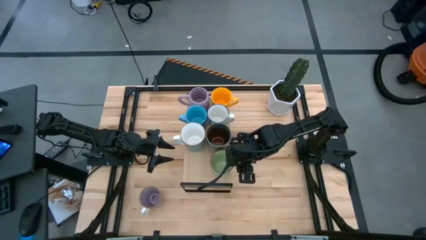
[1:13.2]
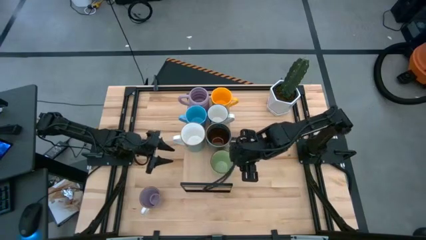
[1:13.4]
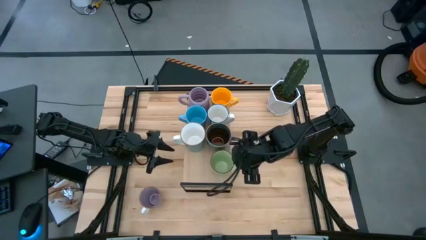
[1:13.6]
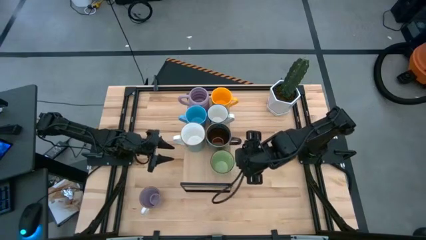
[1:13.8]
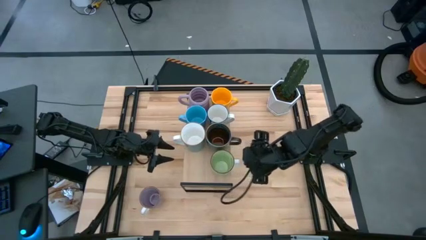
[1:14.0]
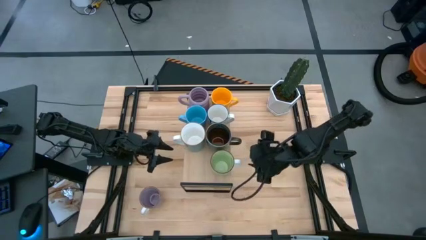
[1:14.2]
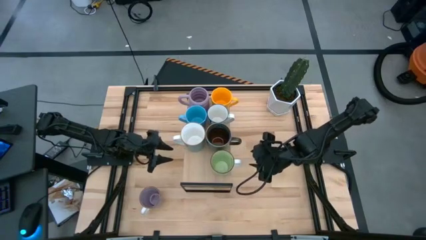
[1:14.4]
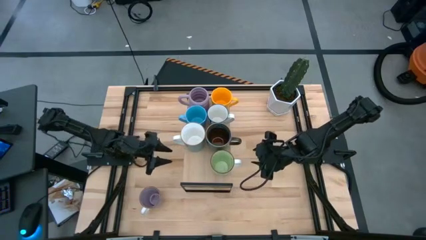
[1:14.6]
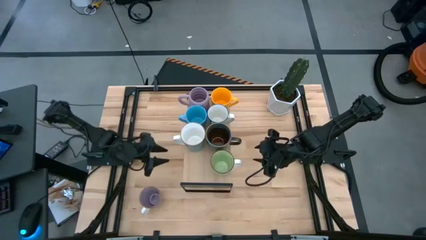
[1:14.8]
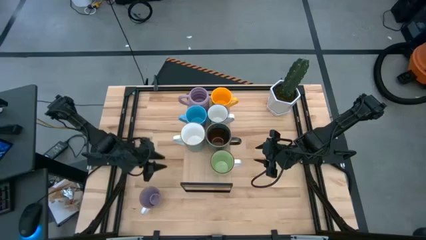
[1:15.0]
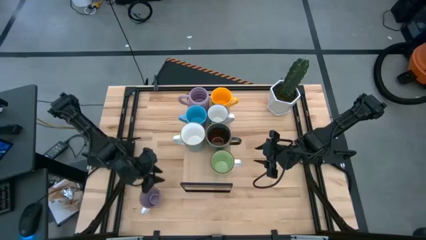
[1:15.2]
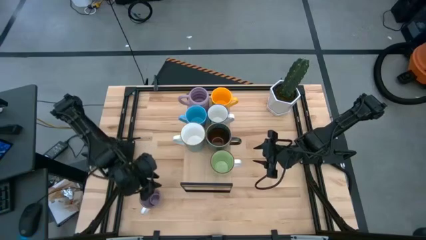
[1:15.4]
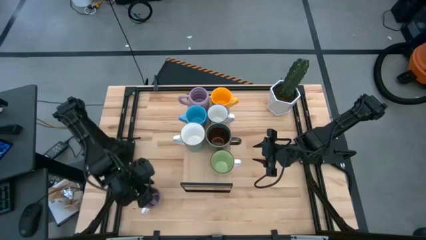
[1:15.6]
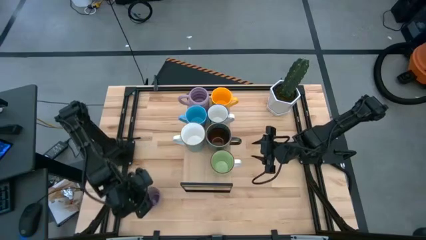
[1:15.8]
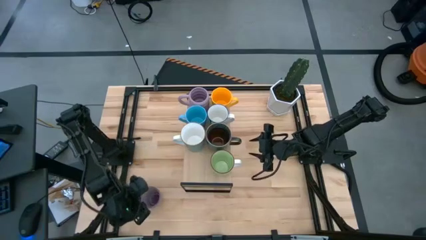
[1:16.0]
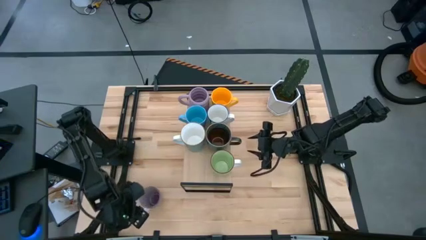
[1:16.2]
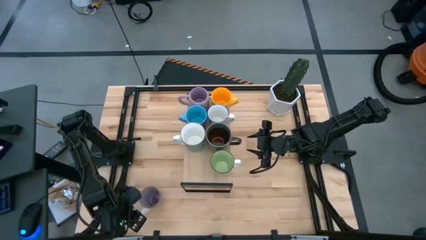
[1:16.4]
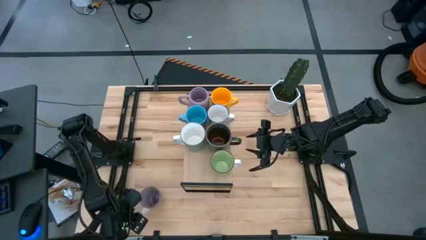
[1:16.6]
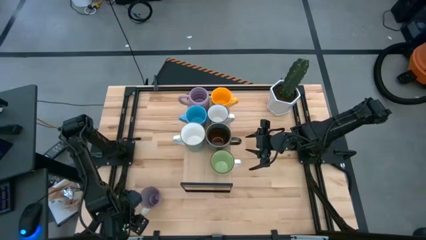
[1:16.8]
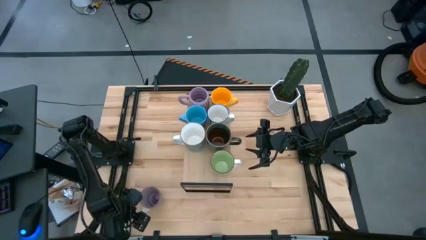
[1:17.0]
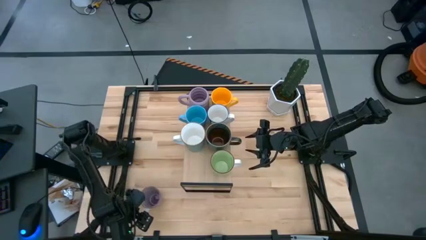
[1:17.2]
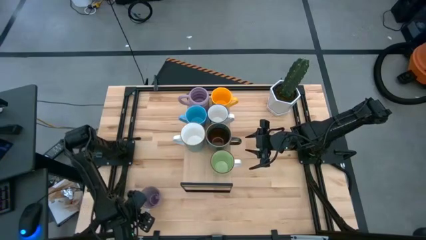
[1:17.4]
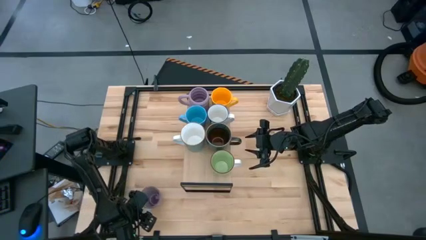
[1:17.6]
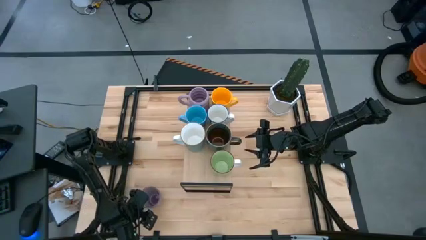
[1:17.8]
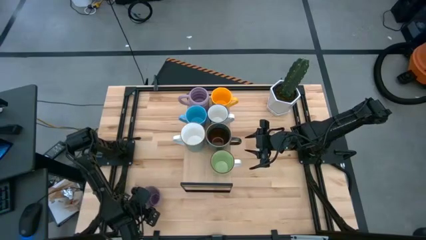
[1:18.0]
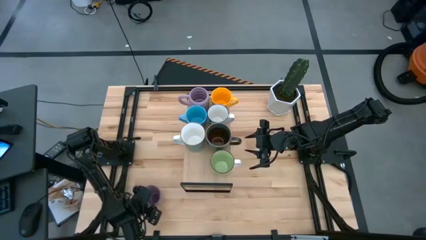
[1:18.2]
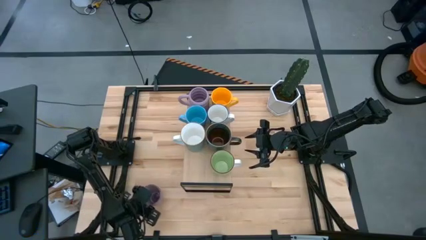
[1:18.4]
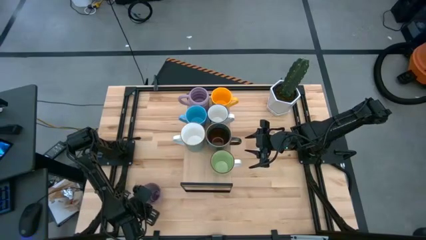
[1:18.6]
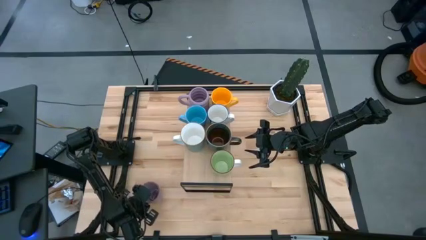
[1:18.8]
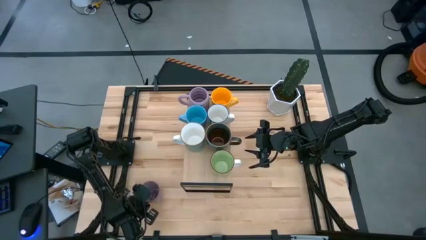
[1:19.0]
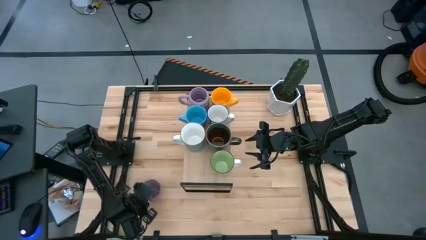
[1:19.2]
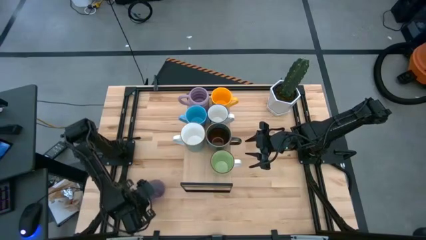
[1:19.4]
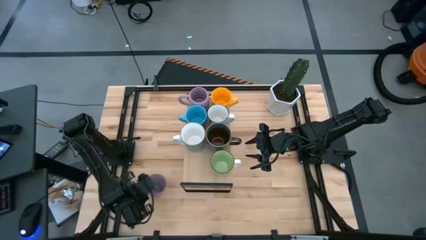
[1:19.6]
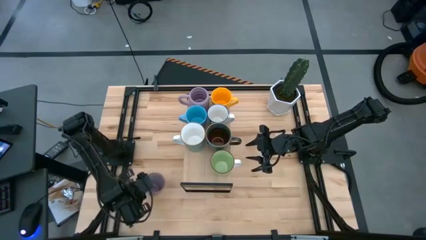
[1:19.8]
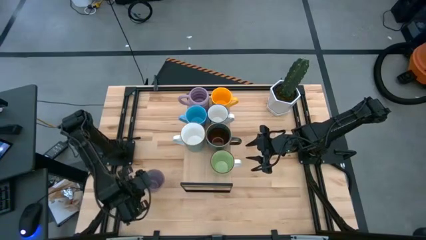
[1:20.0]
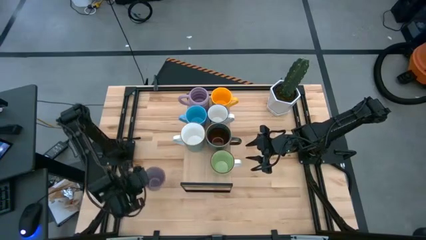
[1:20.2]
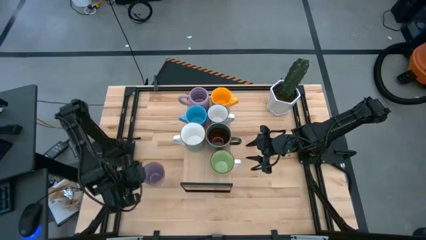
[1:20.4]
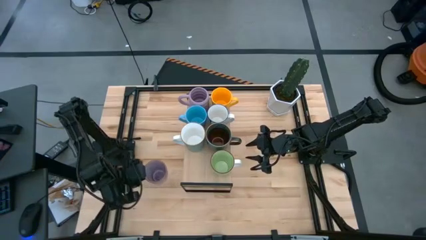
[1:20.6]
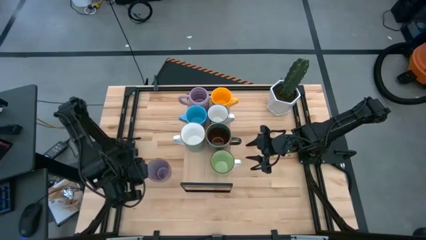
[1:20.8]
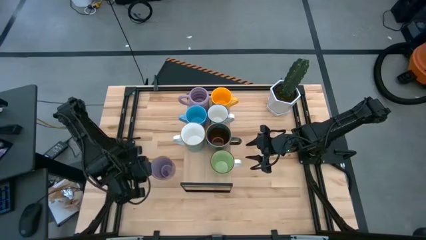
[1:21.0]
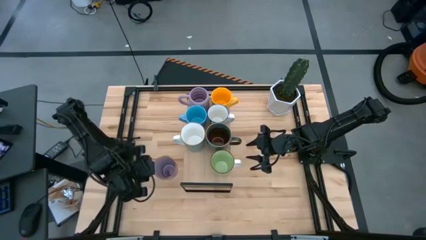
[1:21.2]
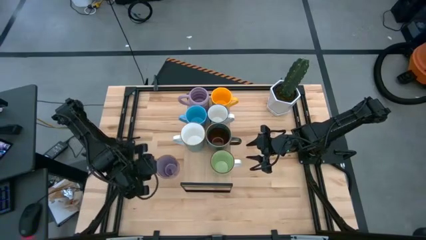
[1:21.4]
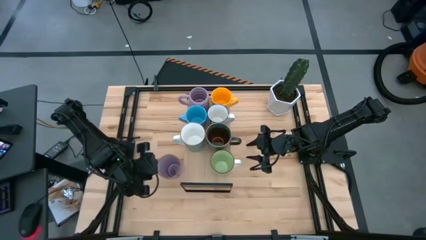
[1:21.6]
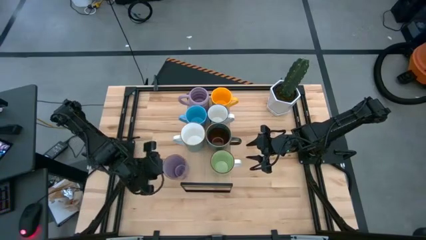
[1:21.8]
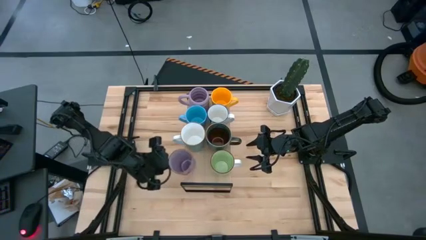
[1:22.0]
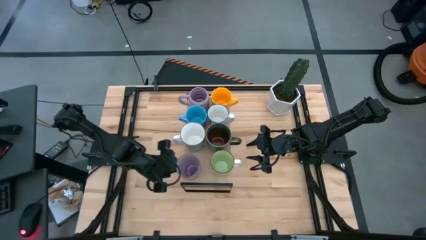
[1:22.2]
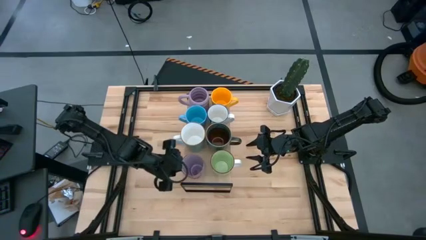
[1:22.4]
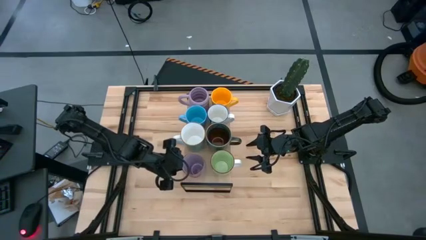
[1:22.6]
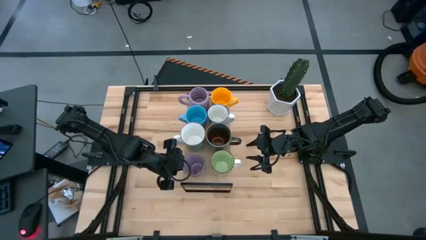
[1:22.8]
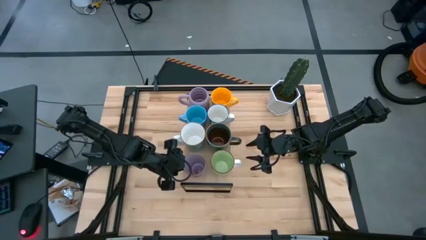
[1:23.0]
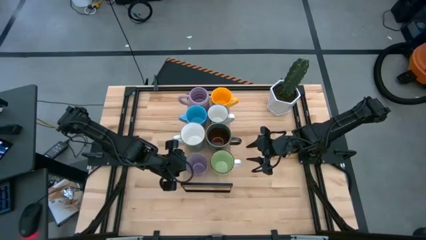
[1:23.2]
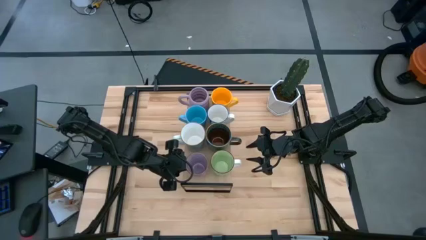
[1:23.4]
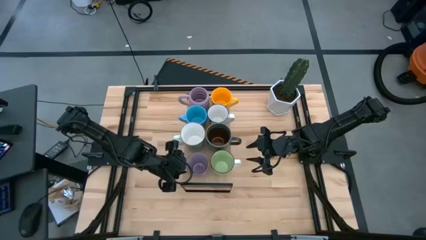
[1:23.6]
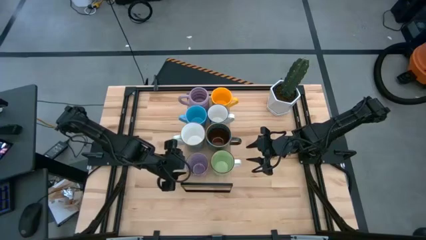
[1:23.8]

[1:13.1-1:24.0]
Task: Place coffee mugs
Put the light purple mug on the shelf

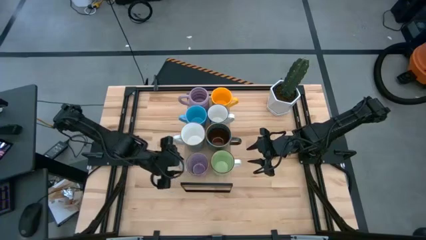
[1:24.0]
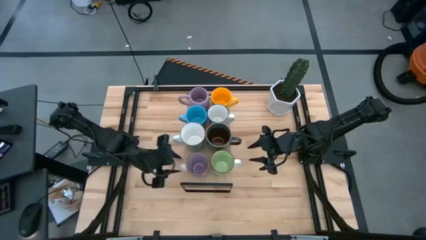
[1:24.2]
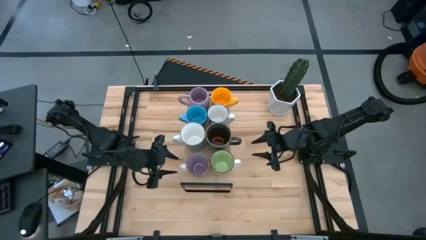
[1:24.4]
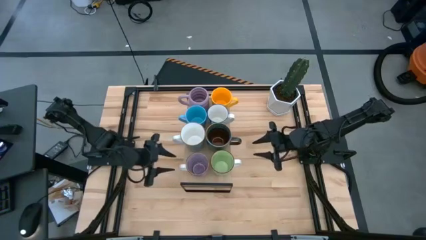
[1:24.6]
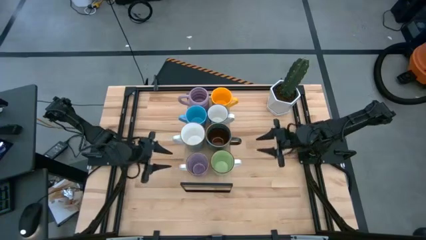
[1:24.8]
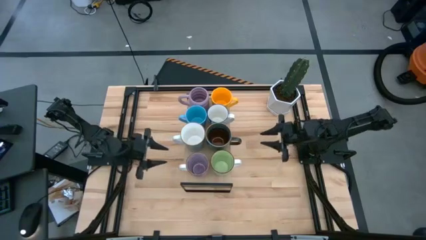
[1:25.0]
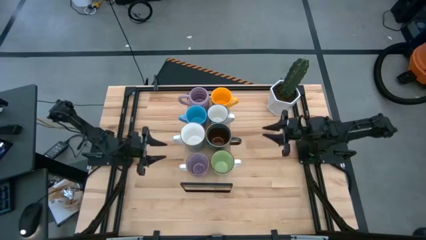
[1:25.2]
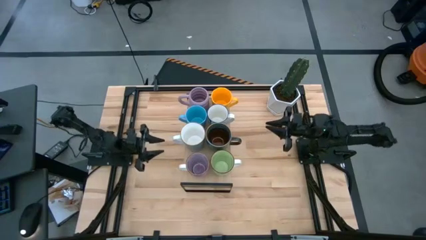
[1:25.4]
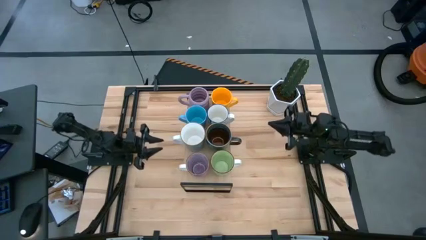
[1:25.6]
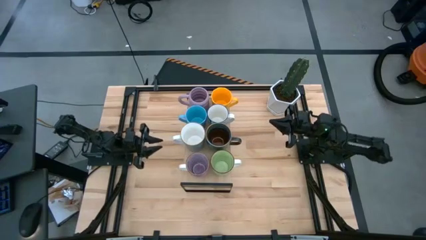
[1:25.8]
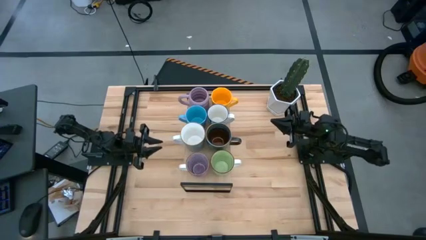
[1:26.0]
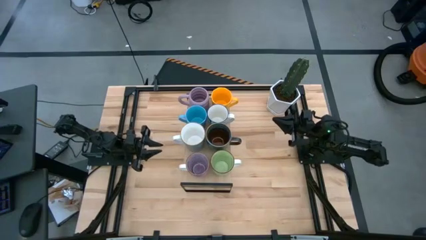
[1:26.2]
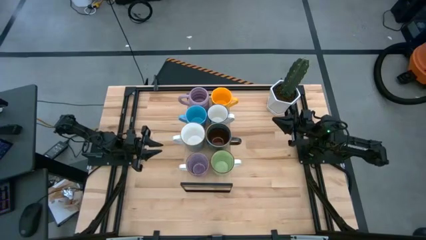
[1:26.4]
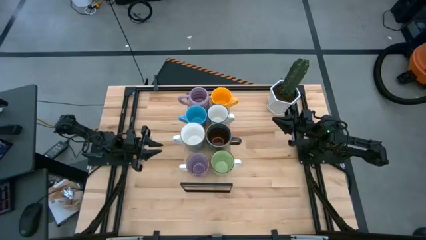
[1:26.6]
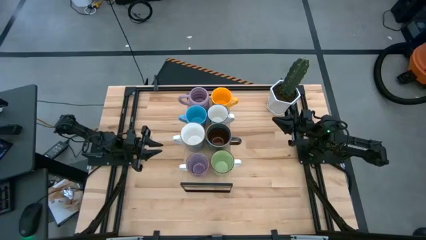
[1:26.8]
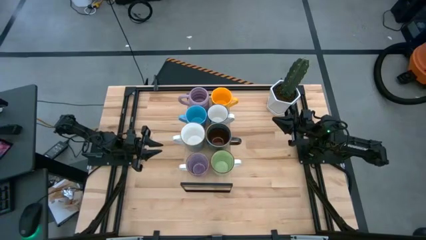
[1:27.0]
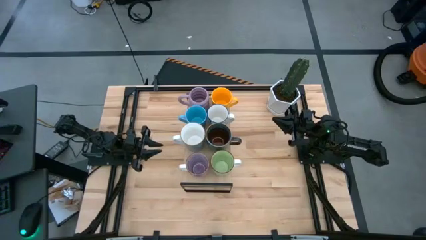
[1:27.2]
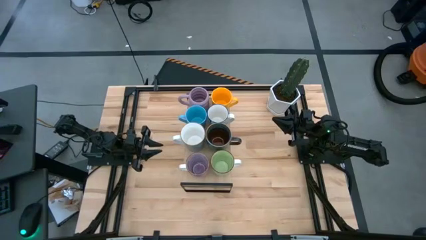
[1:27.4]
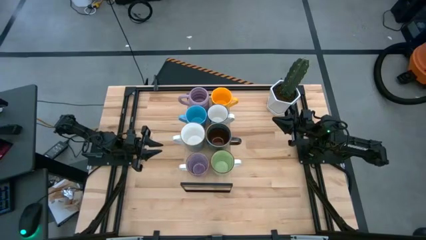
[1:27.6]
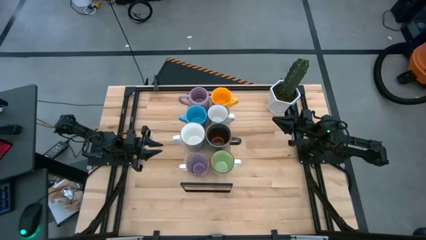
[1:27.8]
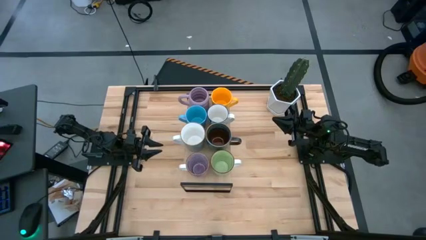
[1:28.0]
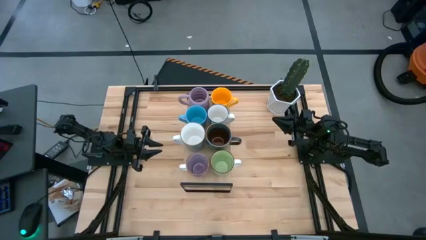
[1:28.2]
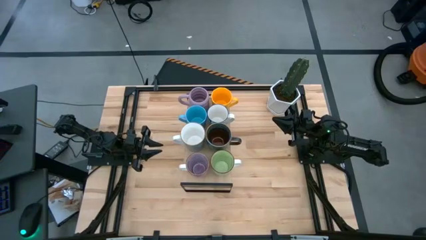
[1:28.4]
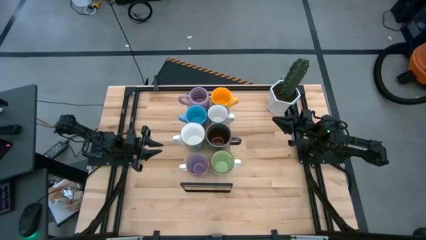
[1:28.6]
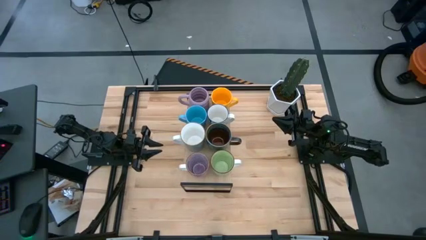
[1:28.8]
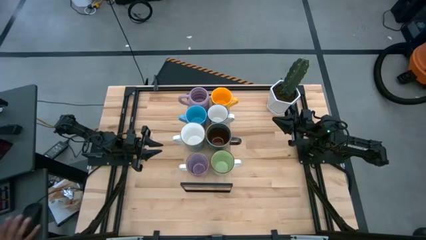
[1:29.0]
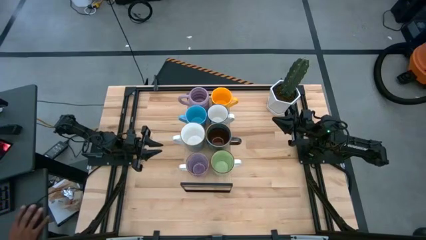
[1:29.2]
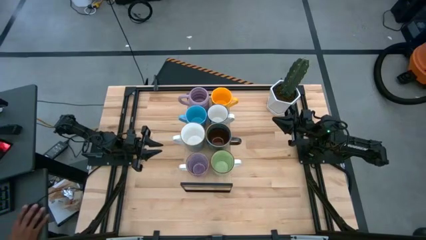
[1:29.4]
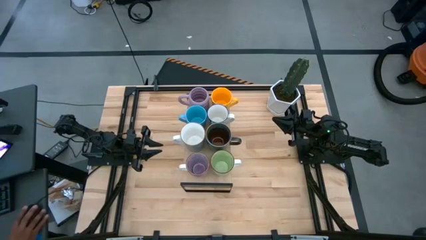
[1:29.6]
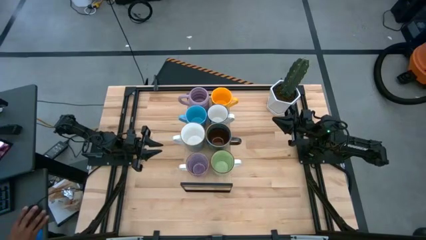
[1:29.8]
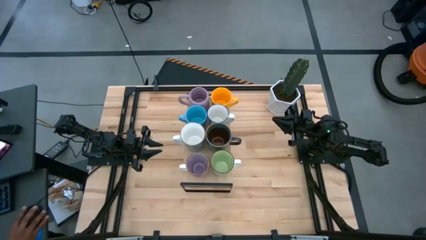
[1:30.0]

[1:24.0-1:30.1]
Return to Home Position
